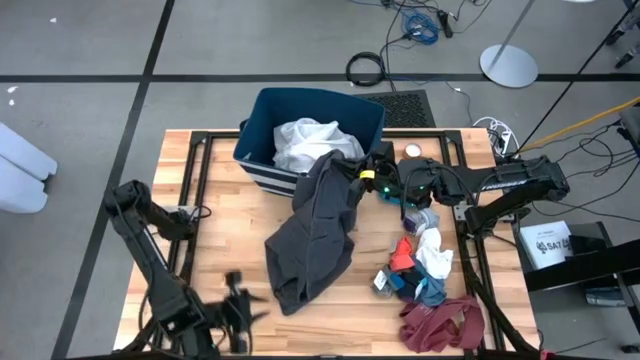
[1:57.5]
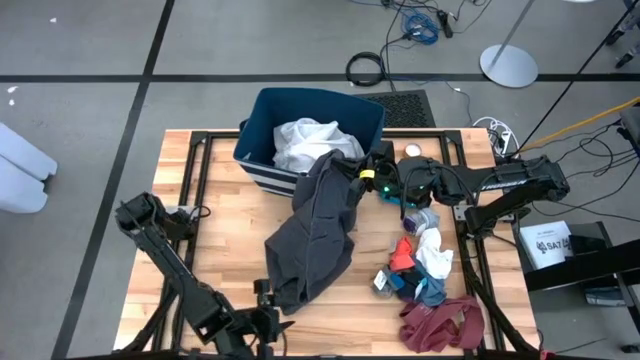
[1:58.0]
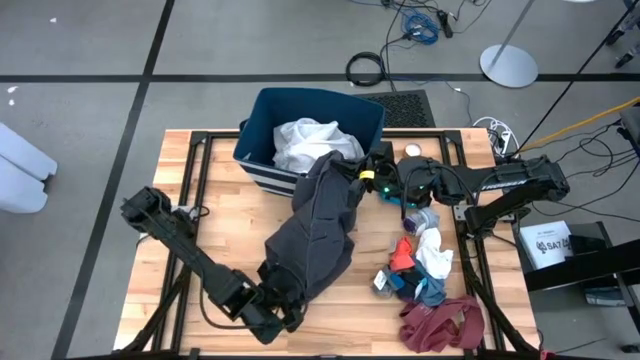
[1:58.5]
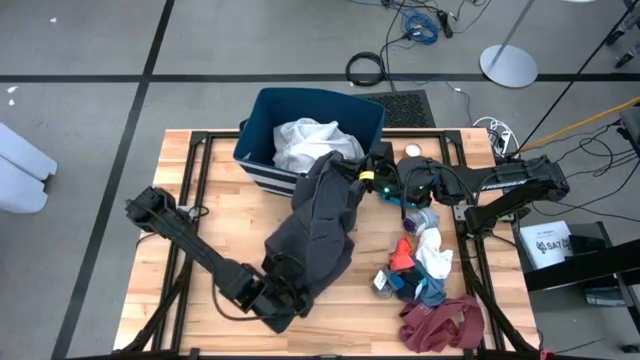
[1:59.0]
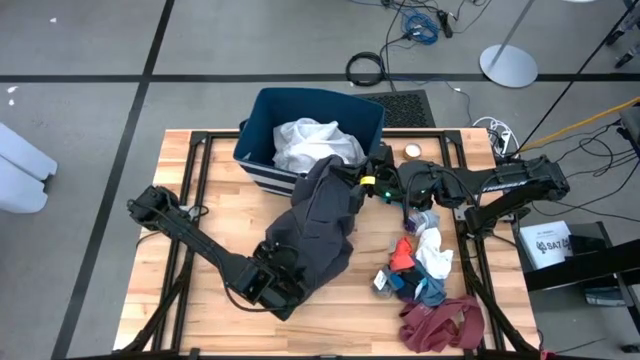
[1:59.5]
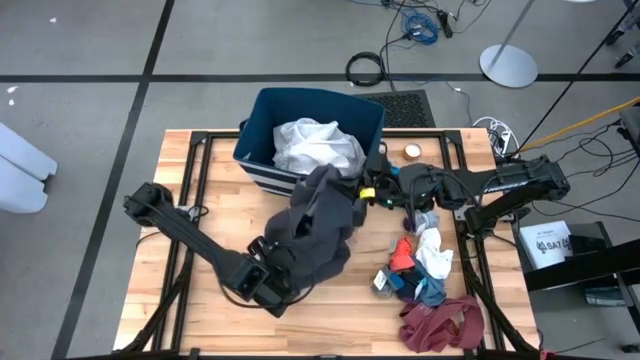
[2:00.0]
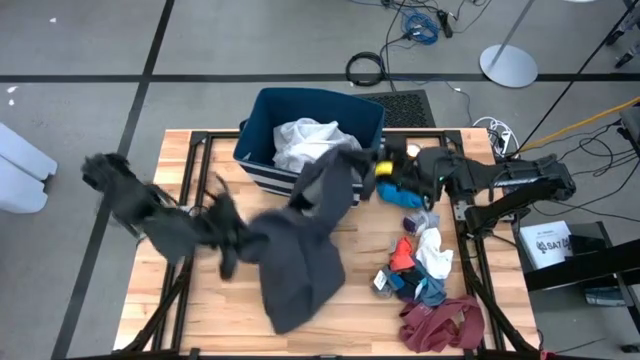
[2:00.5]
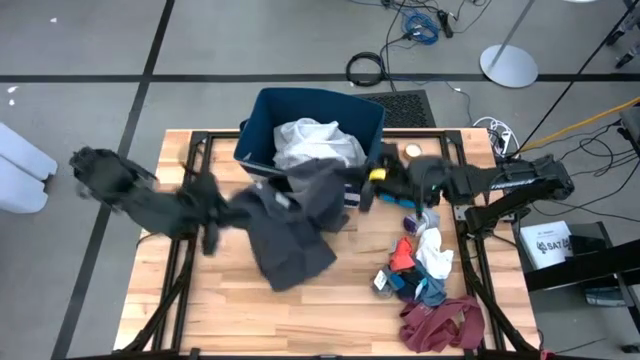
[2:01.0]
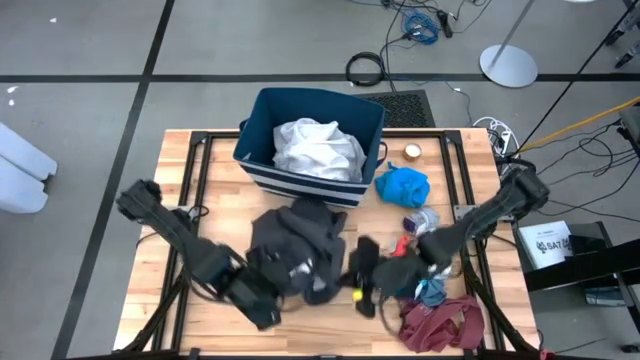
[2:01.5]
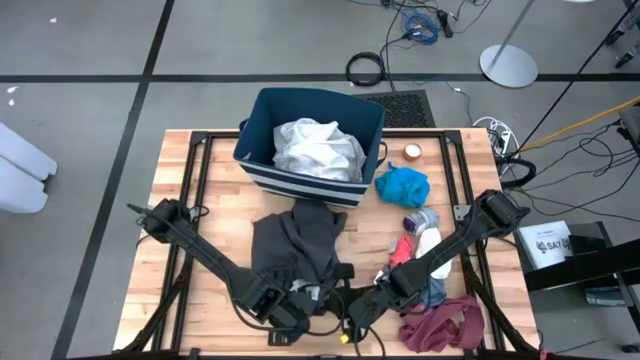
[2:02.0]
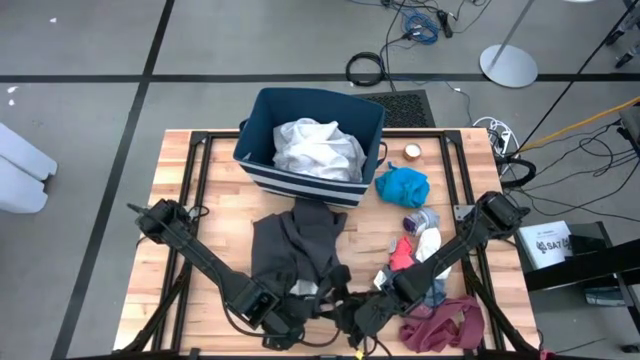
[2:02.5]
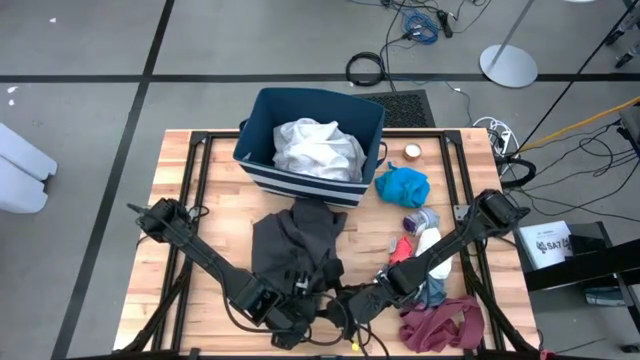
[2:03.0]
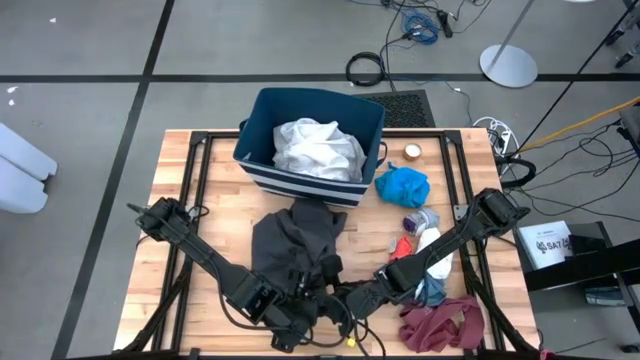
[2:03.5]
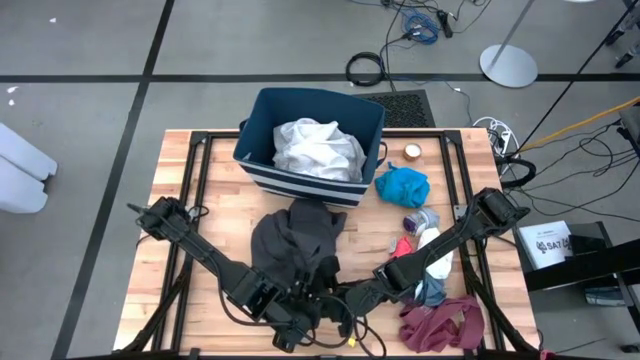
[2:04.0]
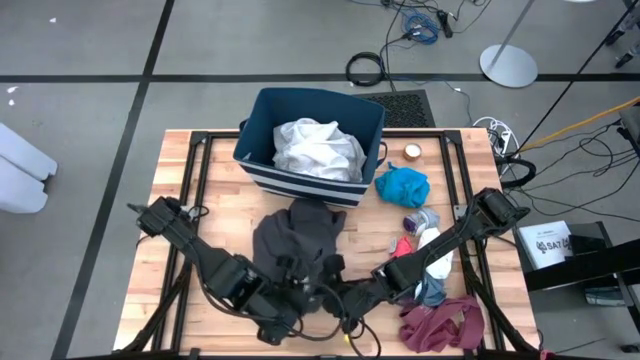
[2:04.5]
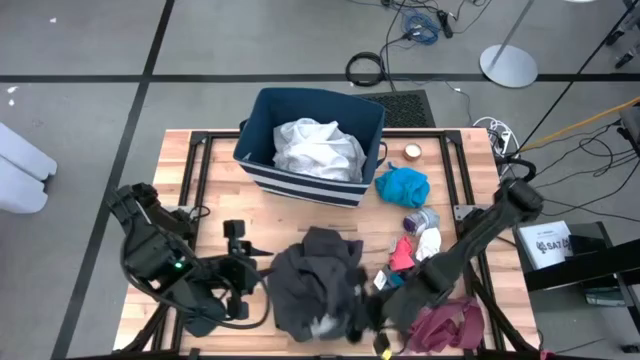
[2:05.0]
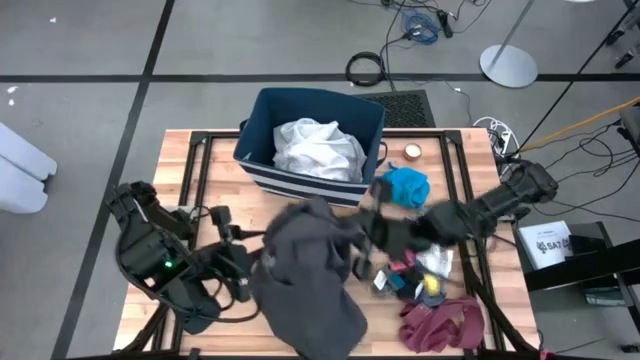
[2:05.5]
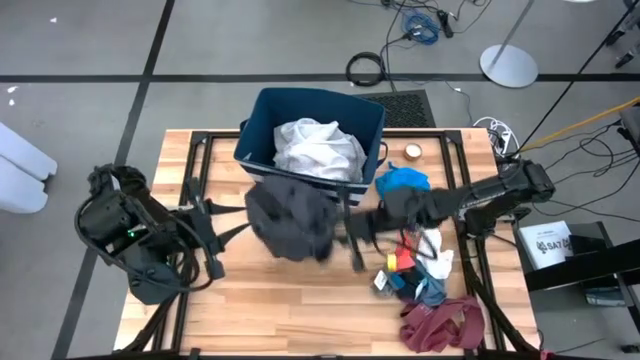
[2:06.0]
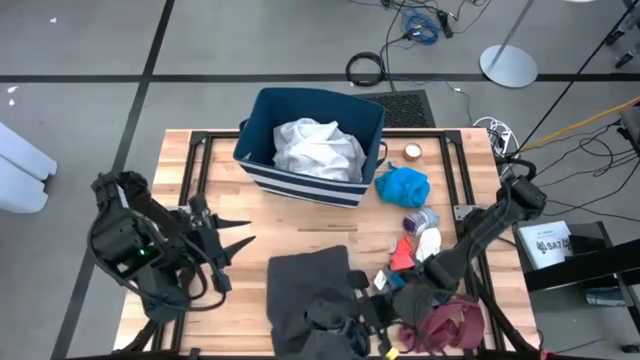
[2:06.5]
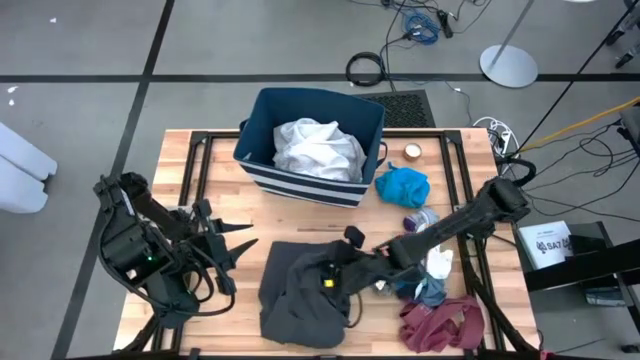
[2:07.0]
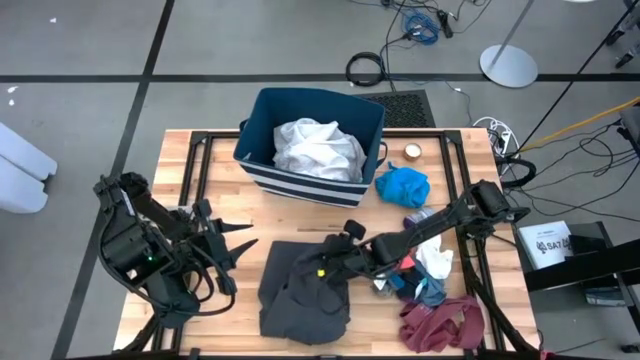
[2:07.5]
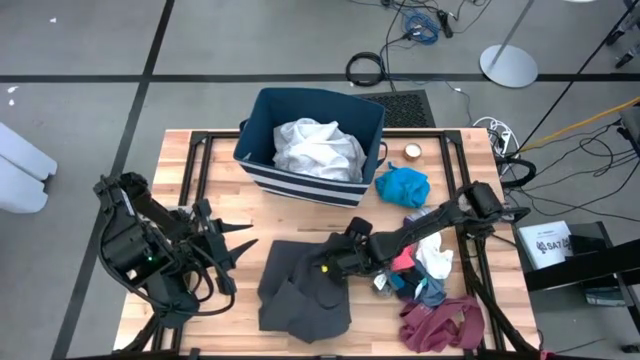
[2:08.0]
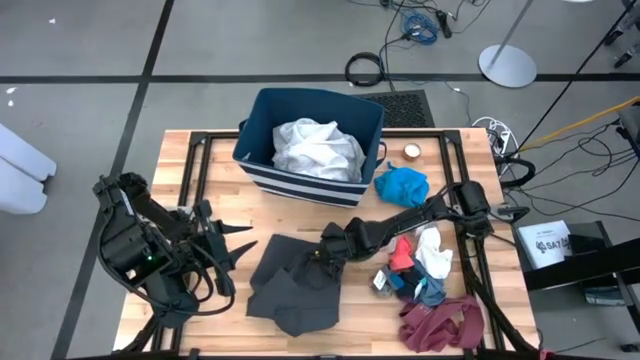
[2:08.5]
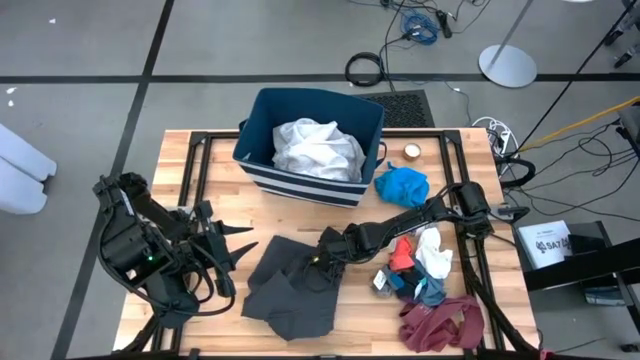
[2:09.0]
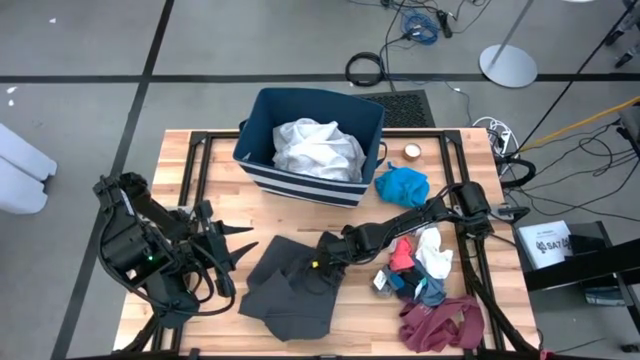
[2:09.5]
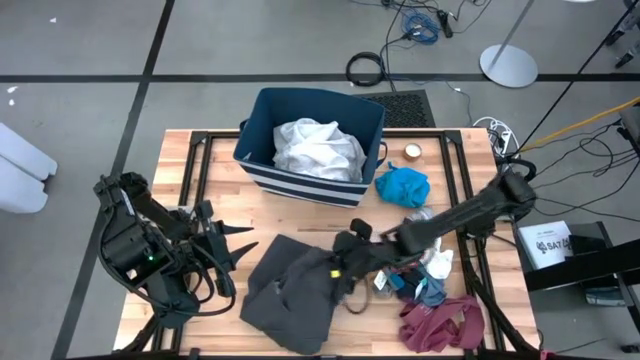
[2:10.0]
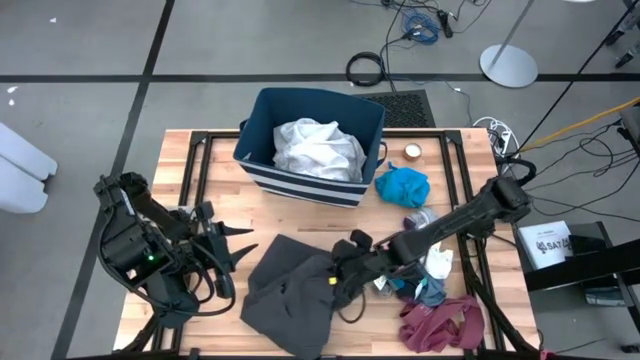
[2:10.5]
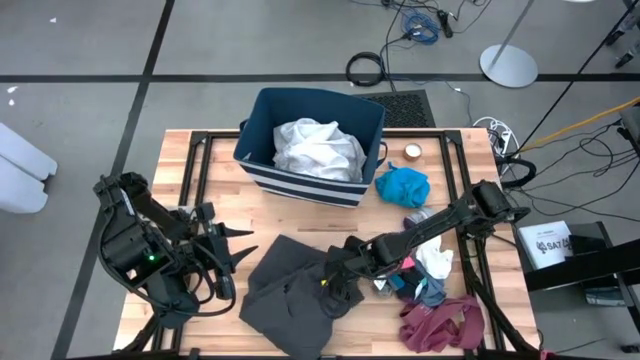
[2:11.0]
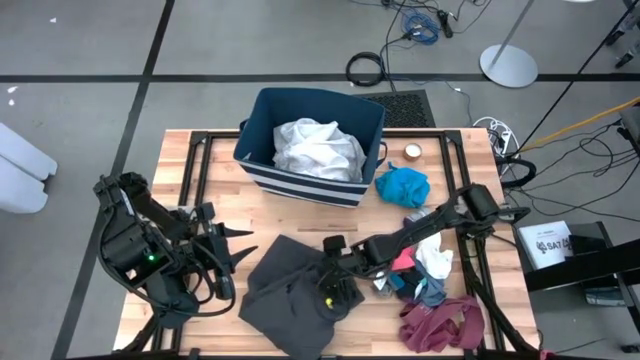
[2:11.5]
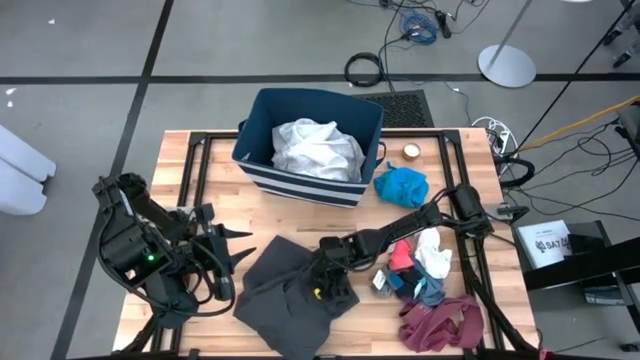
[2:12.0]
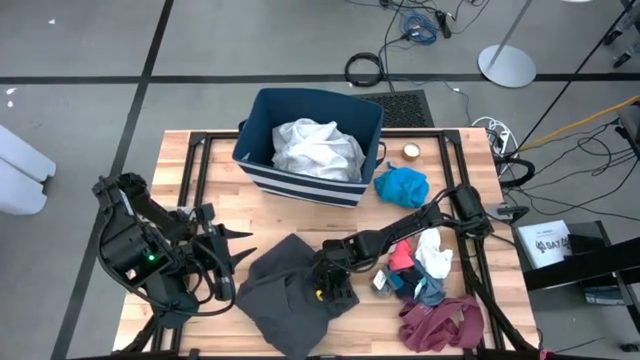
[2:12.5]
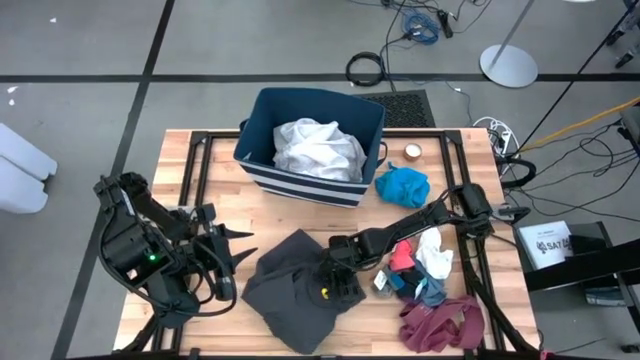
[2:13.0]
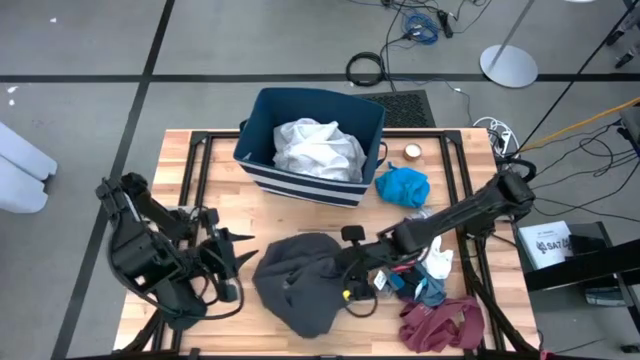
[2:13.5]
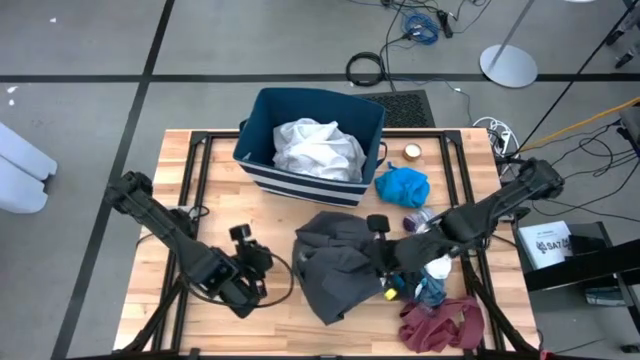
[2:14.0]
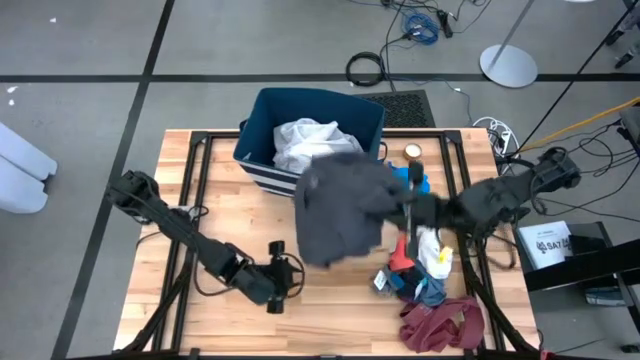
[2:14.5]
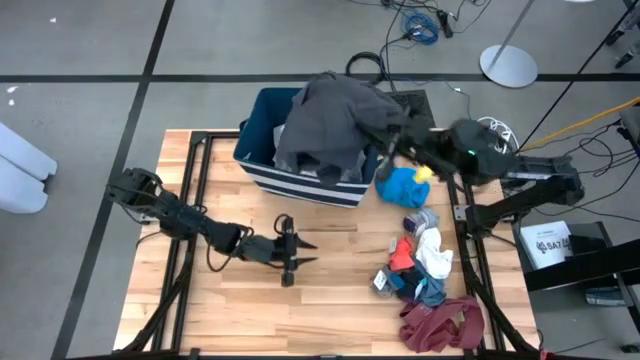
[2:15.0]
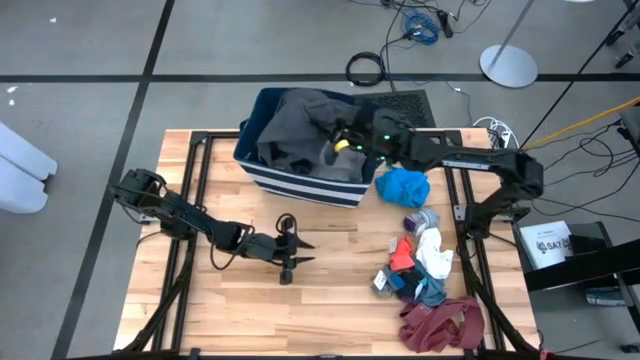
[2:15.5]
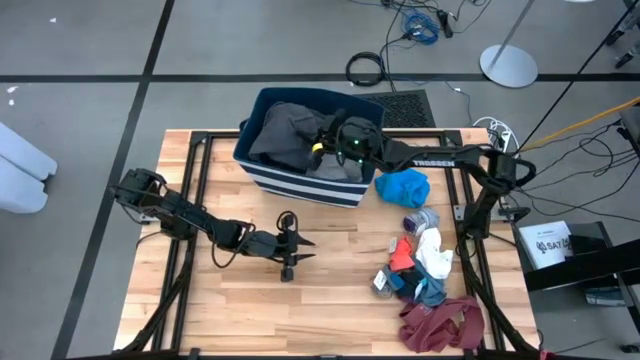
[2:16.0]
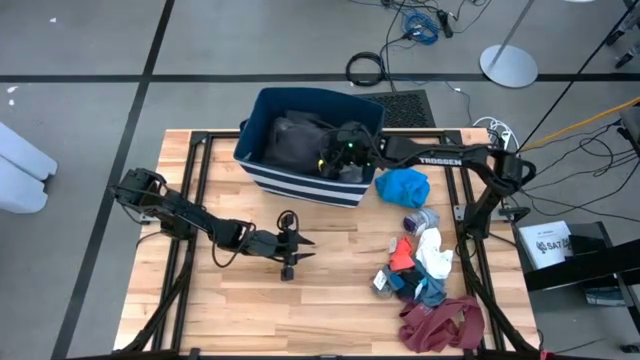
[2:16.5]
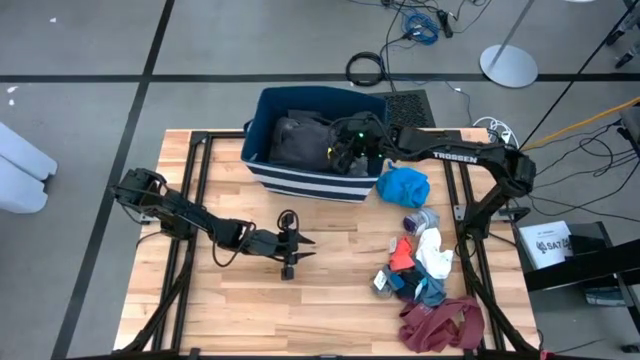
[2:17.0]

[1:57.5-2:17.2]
Task: Sort clothes
Put the black pants into the blue laundry bin

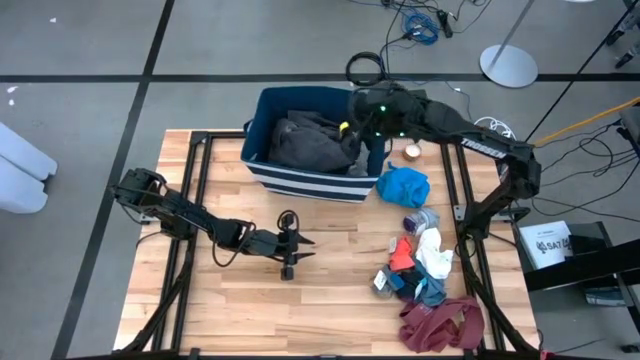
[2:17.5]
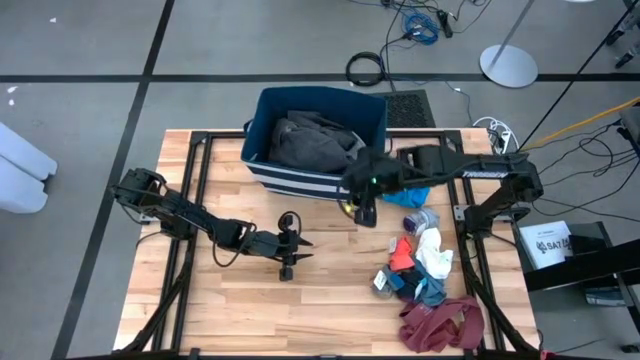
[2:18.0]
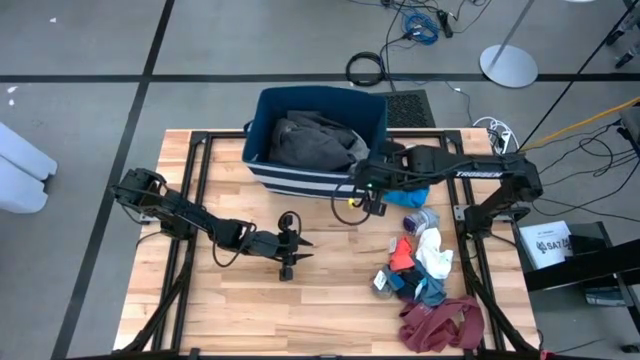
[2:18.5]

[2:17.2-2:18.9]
Adjust the blue laundry bin

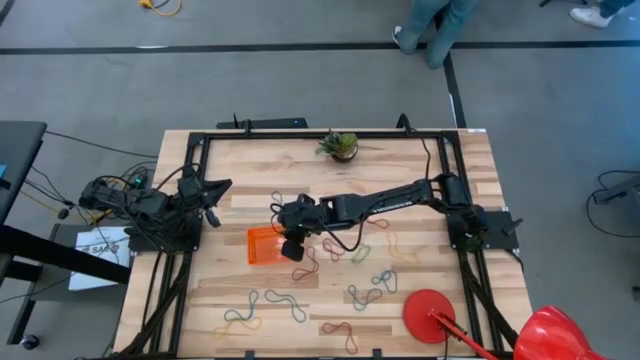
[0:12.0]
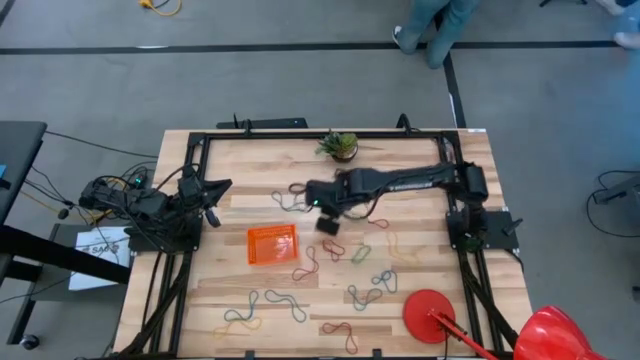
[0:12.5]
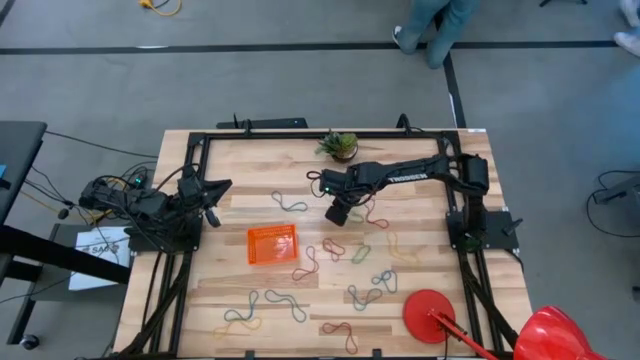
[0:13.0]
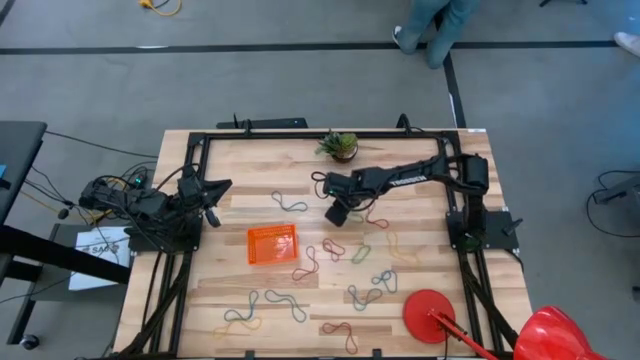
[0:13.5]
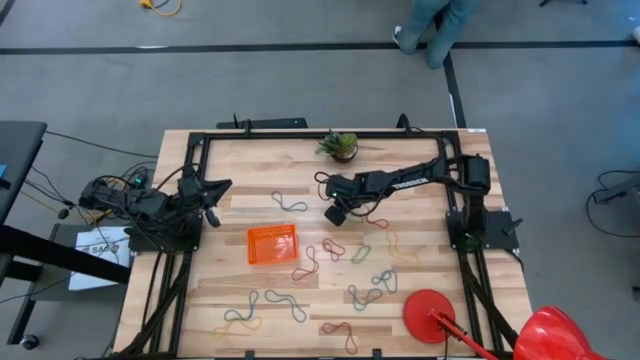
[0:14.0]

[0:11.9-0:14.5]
Task: Pick and place rubber bands into bin
Put the top yellow rubber band into the orange container
